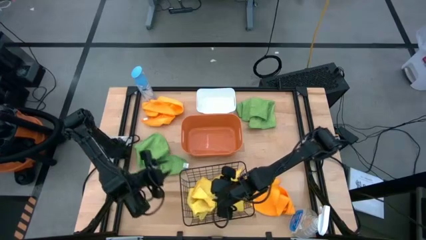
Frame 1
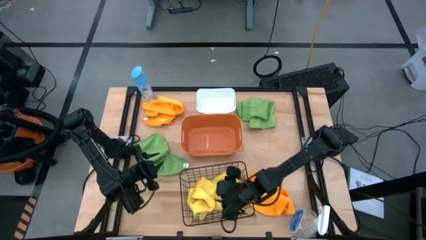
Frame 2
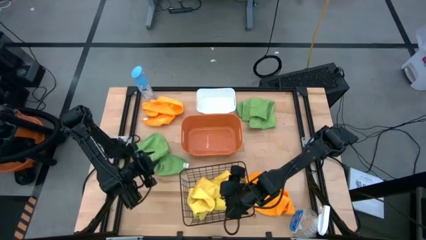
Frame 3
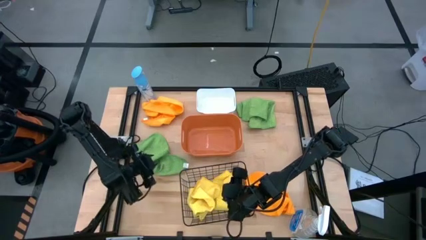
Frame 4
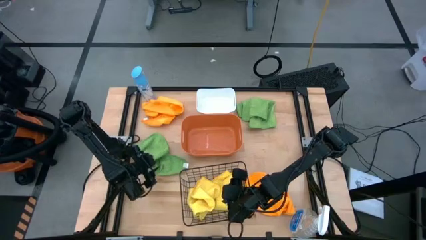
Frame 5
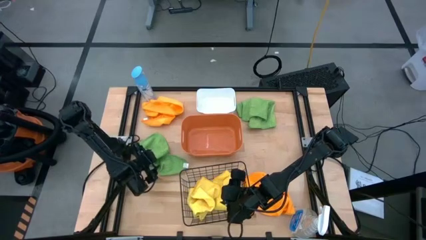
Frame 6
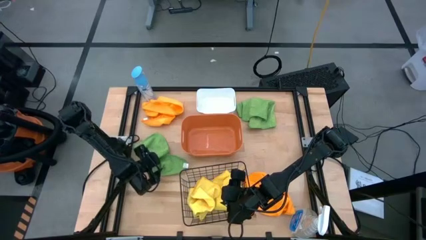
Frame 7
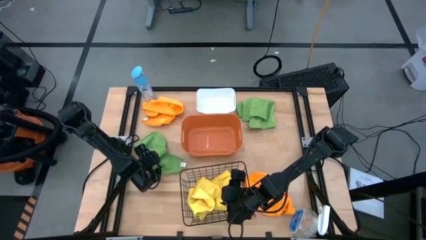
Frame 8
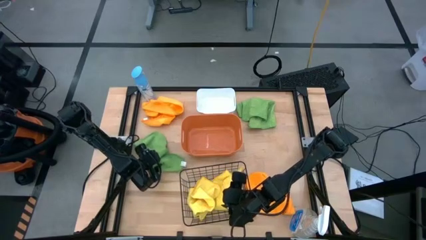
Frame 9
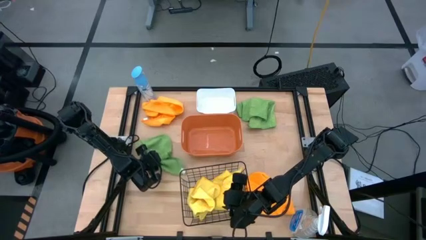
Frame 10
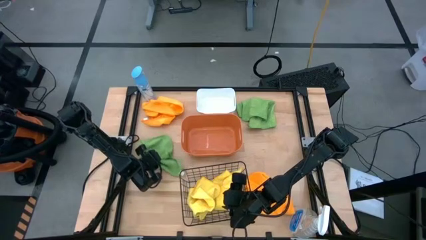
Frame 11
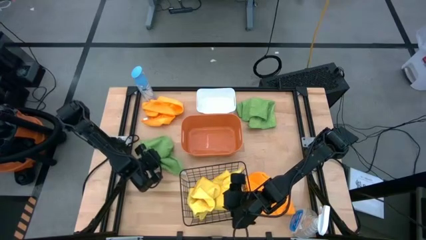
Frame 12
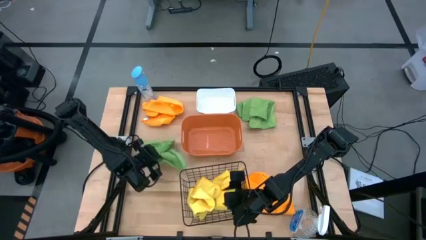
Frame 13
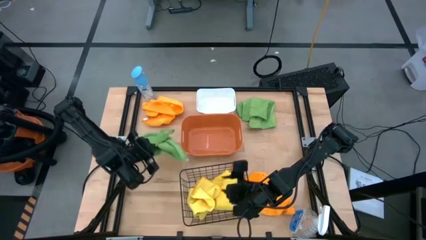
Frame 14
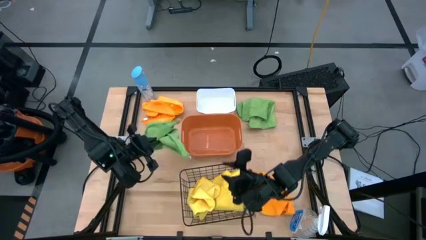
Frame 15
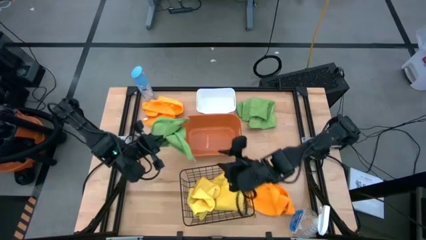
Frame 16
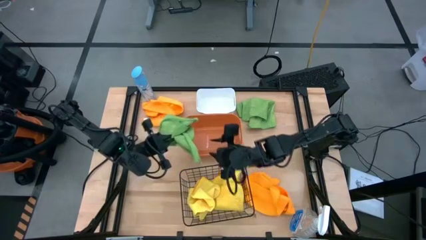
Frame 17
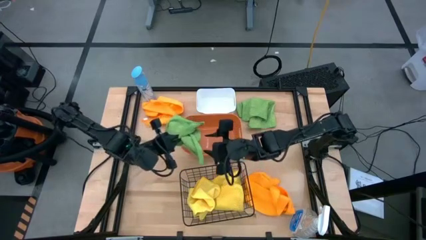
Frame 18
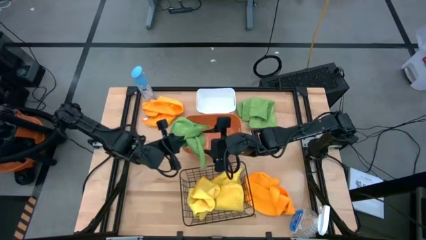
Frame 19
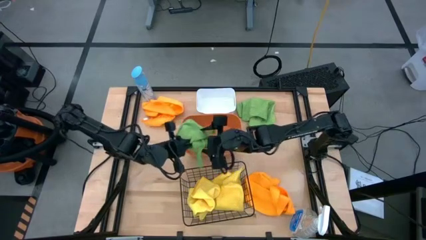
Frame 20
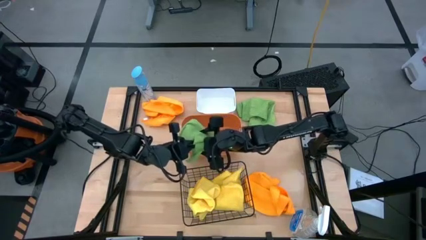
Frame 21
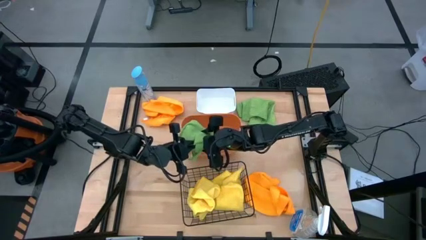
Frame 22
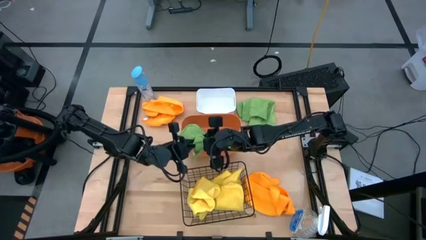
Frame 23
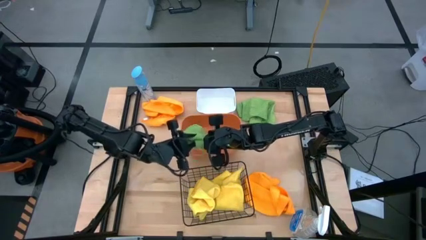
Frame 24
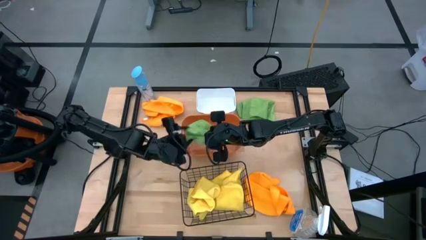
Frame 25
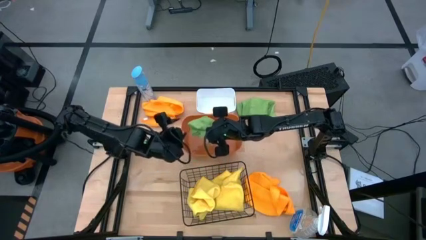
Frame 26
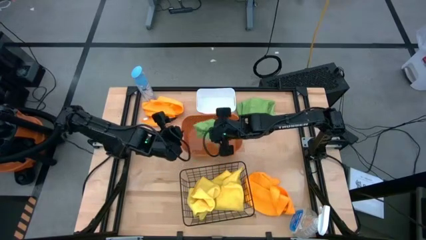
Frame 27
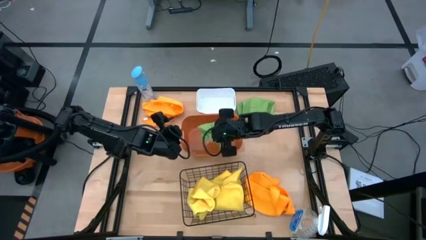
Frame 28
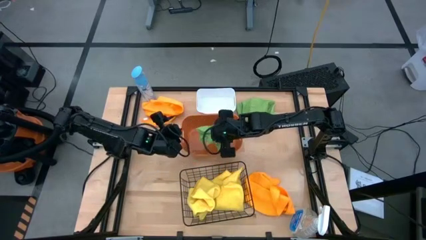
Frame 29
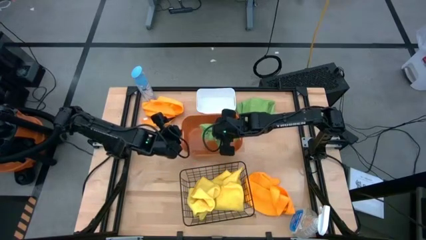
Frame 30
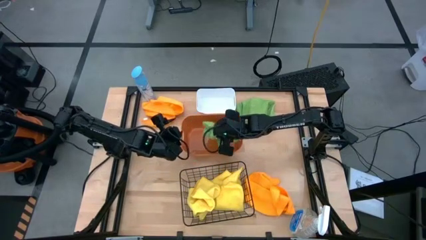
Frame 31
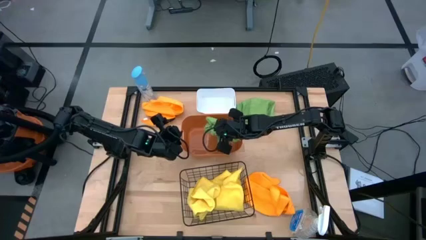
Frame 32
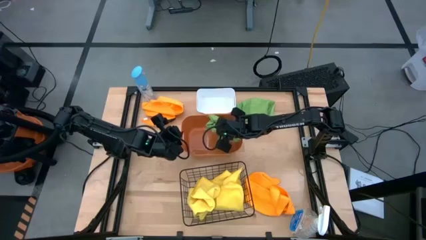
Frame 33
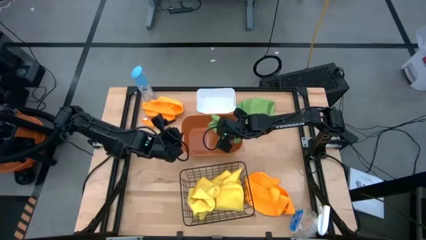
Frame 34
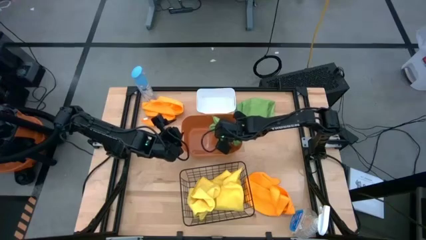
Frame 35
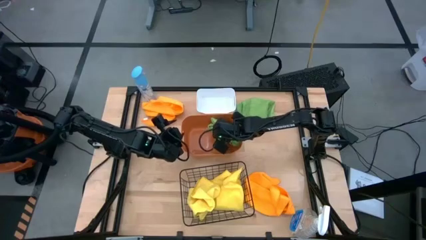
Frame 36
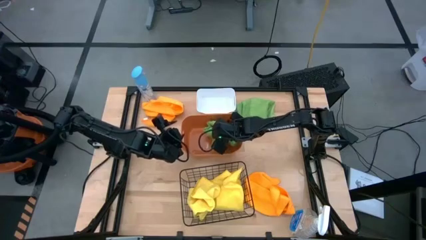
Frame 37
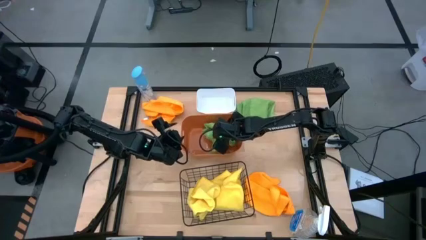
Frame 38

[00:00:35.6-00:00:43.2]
Task: Sort microfiber towel by color & place in baskets
Put the left green microfiber cloth into the orange bin

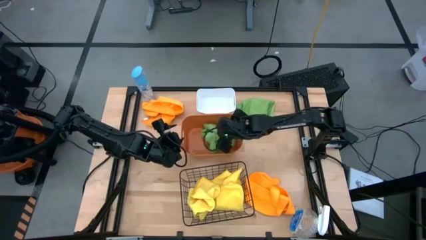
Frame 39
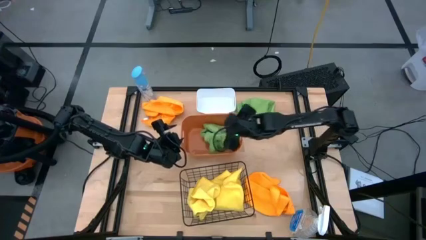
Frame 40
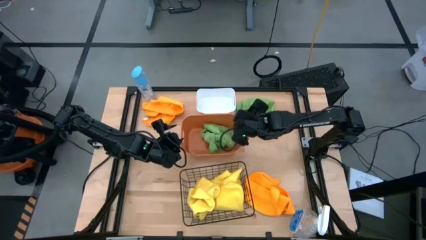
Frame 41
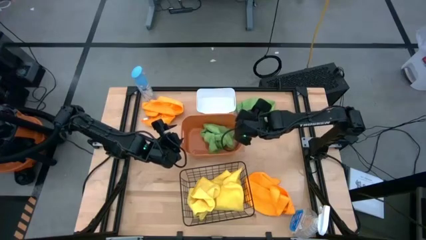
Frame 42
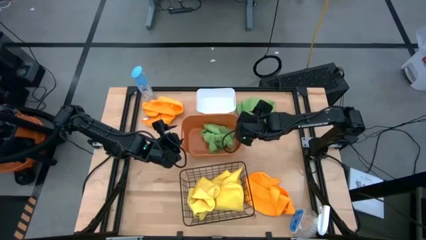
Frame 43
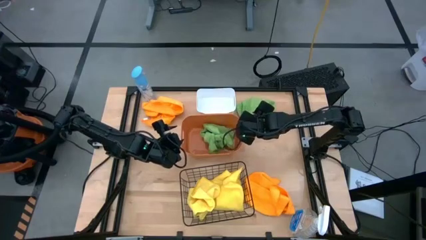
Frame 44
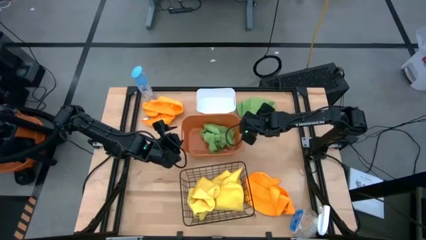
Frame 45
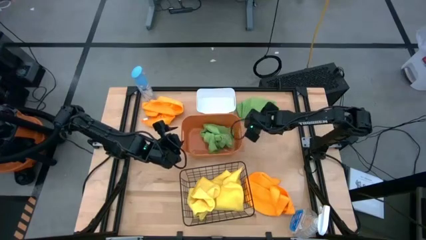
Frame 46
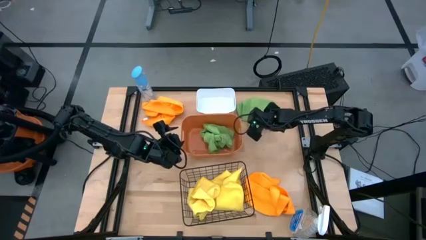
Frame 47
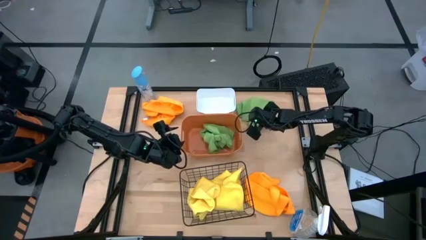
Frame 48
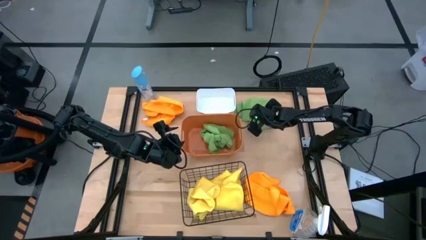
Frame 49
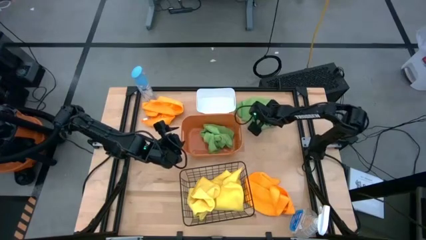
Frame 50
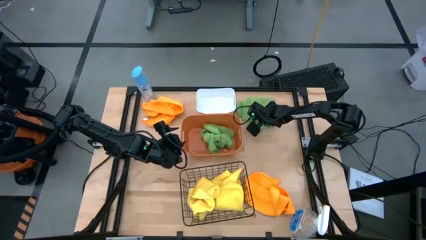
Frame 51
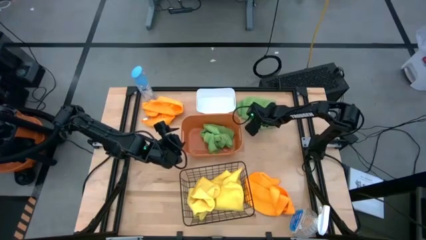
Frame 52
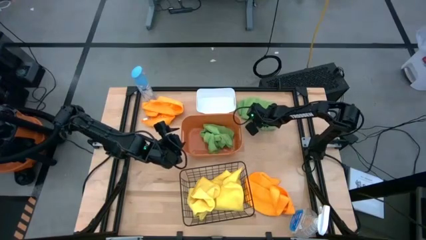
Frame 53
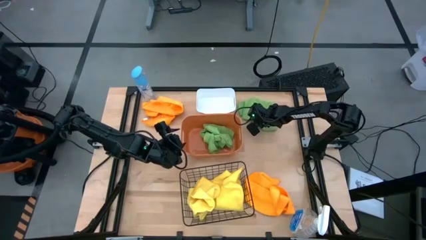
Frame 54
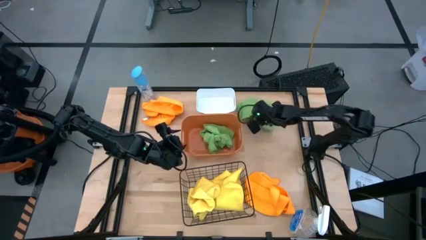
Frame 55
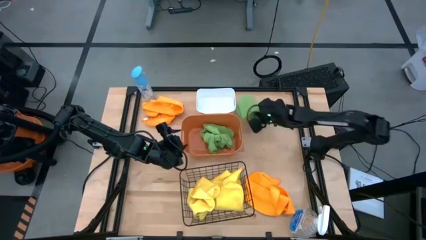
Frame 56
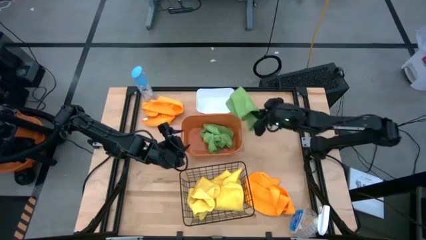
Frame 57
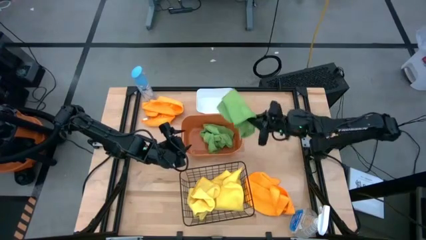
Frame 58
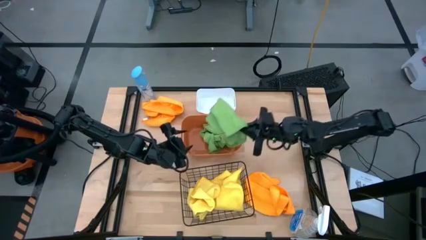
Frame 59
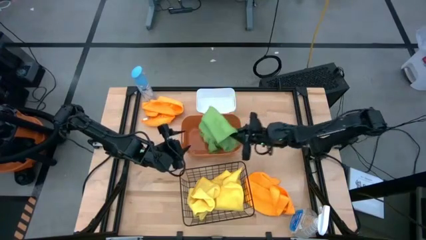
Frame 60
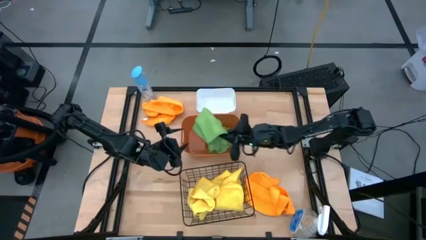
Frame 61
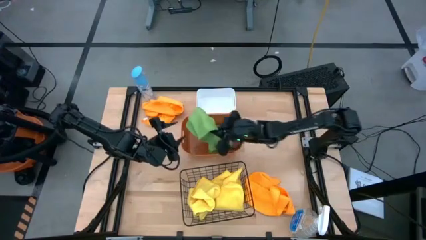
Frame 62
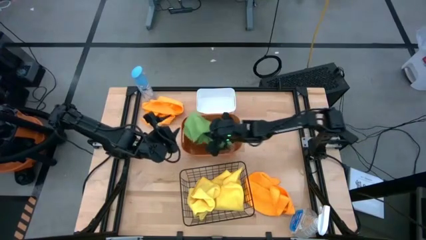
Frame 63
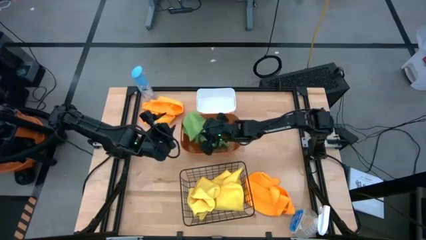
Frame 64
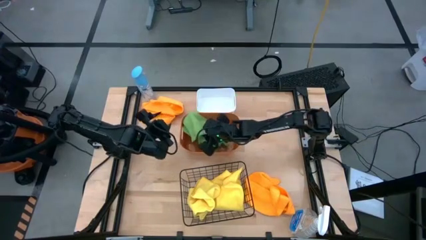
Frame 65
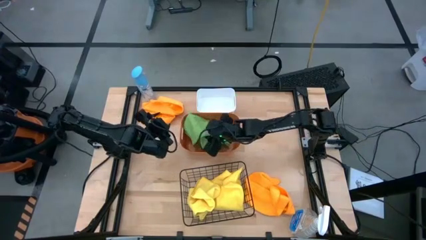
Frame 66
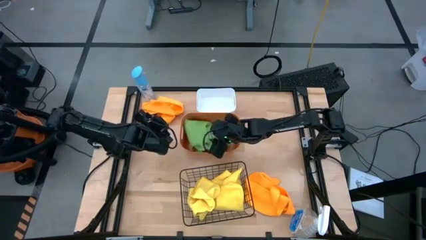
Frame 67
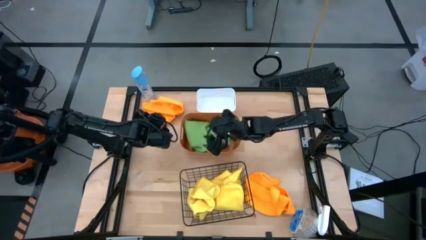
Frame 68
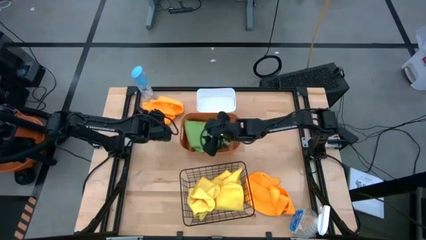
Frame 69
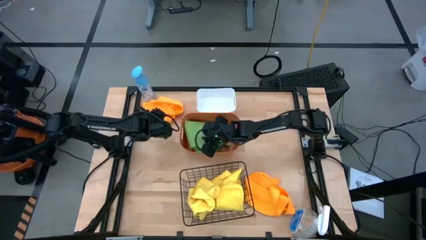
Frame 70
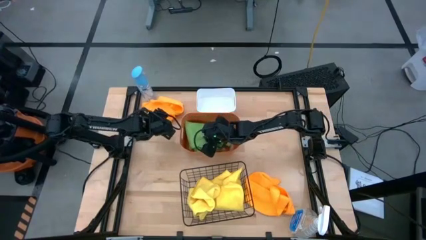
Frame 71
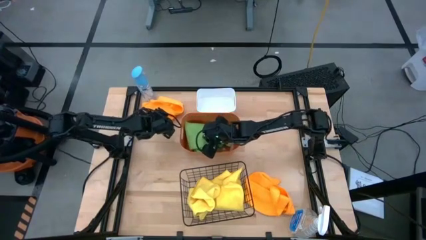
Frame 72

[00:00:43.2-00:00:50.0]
Put the green microfiber cloth into the orange bin
